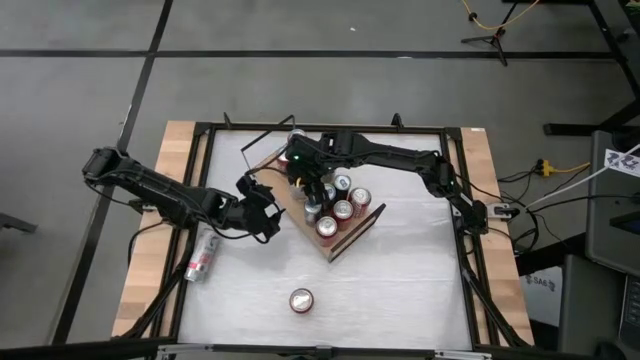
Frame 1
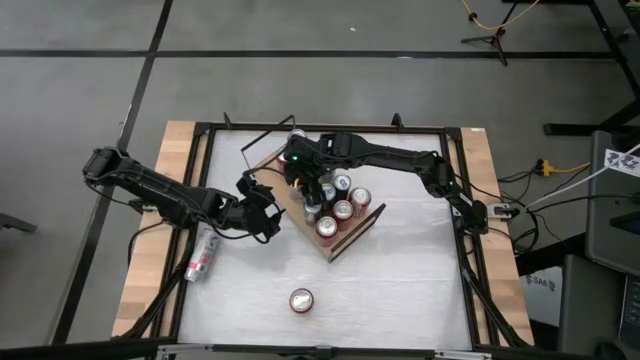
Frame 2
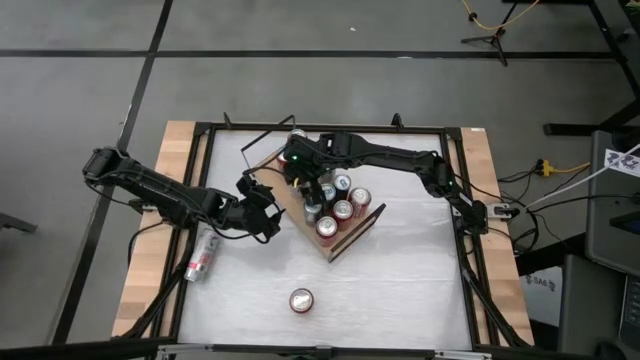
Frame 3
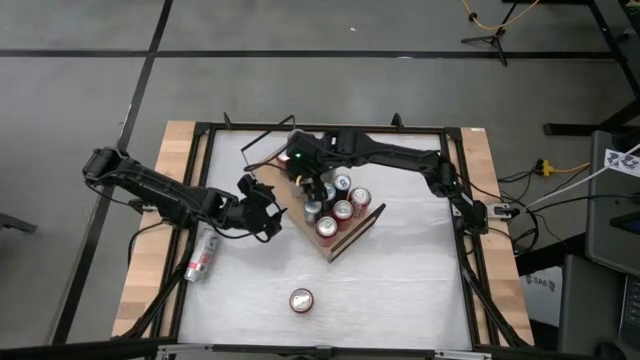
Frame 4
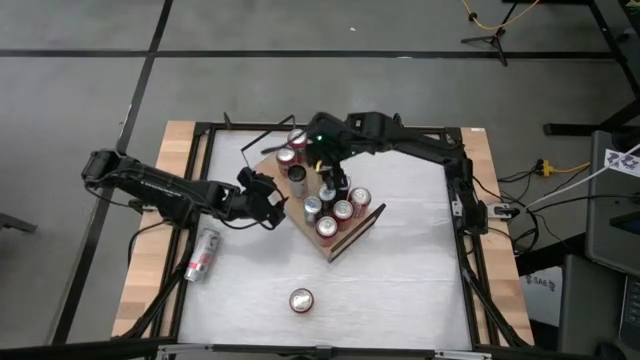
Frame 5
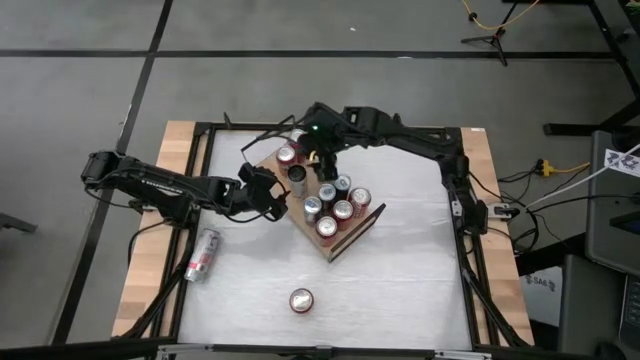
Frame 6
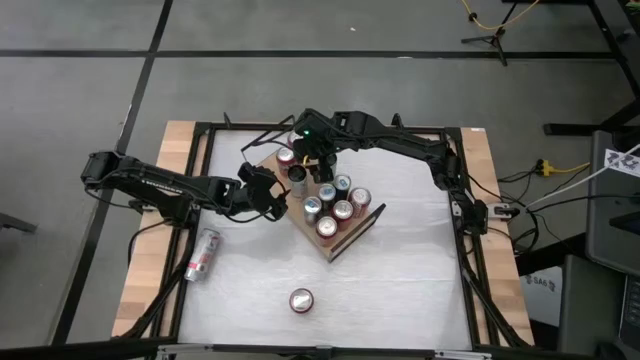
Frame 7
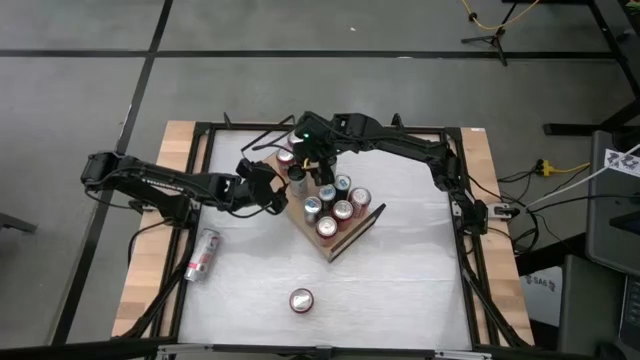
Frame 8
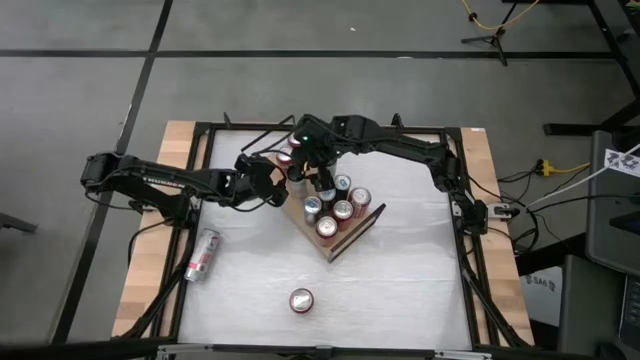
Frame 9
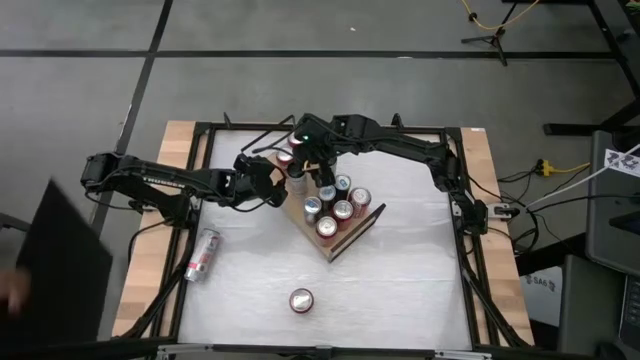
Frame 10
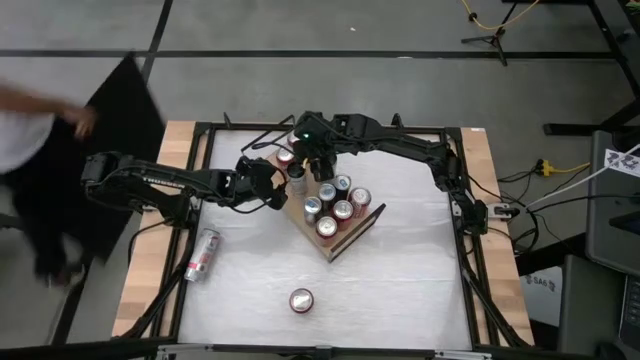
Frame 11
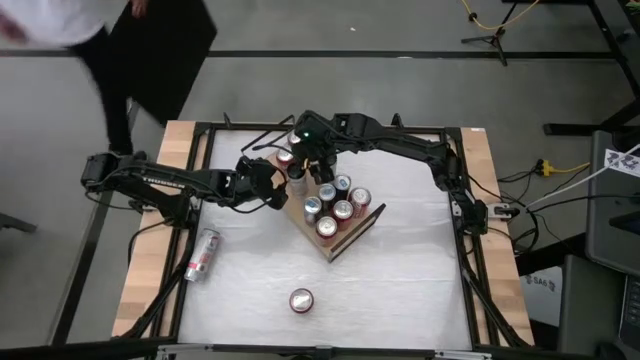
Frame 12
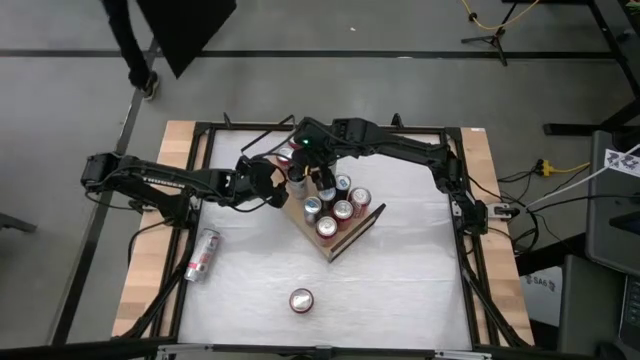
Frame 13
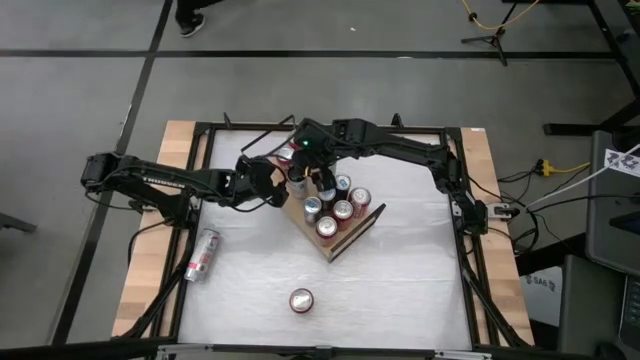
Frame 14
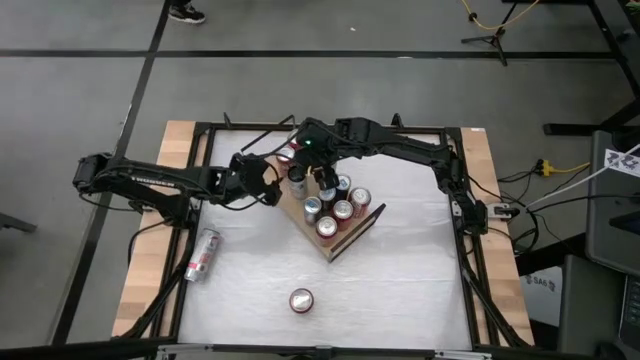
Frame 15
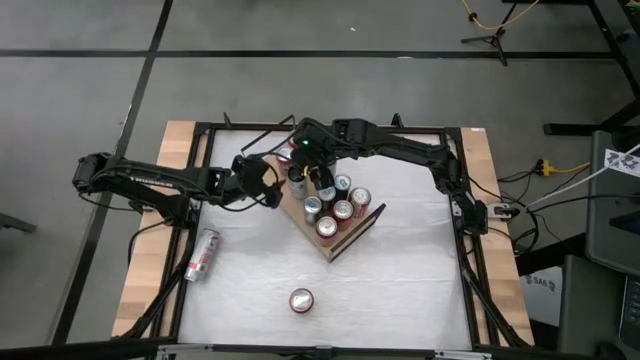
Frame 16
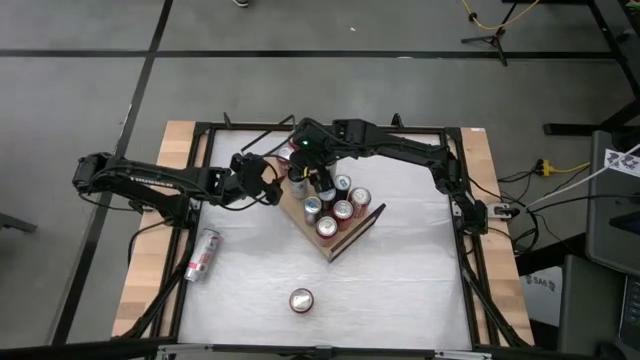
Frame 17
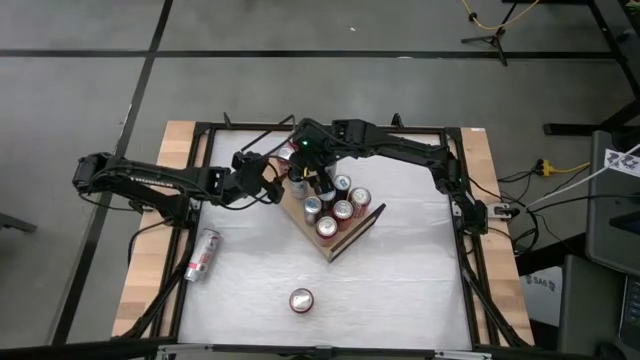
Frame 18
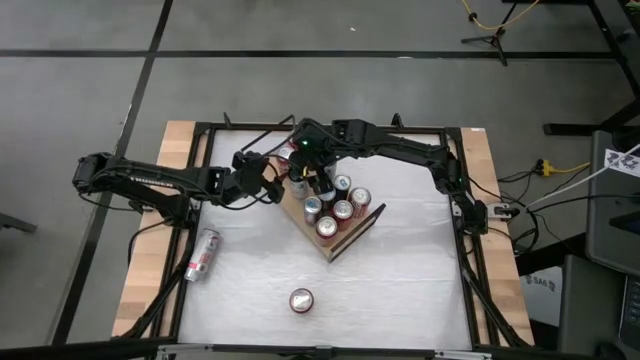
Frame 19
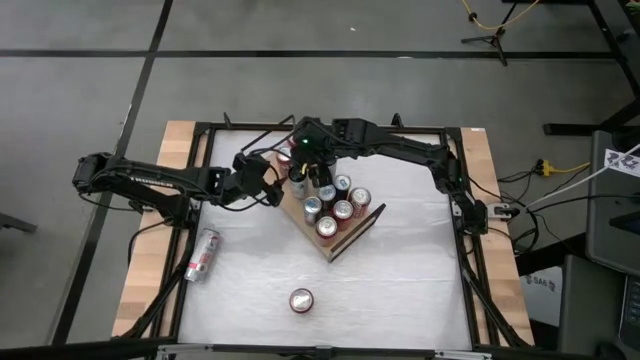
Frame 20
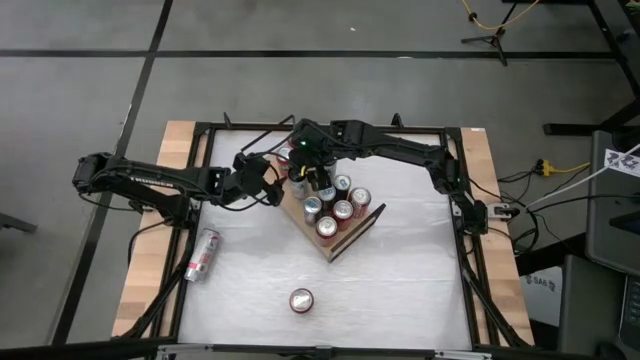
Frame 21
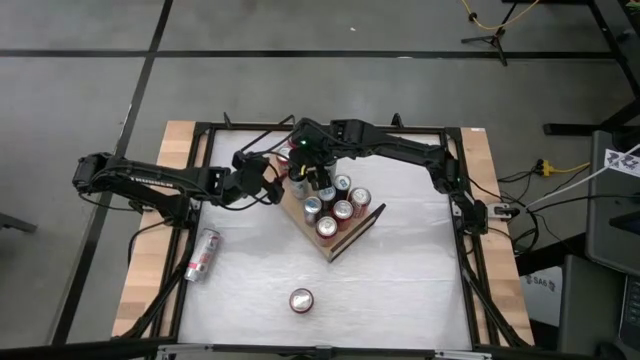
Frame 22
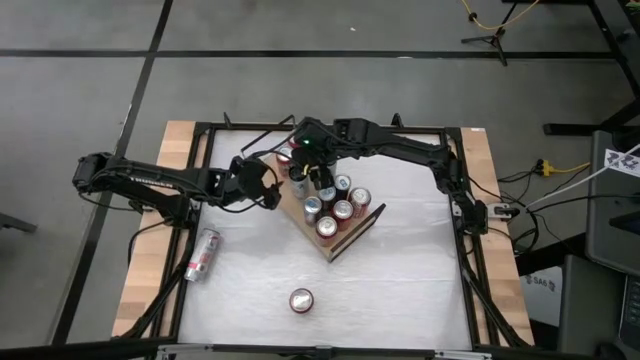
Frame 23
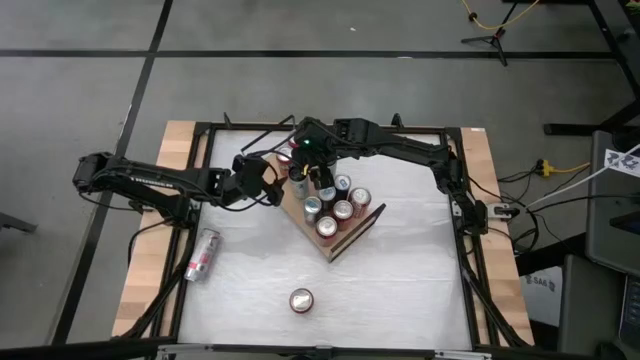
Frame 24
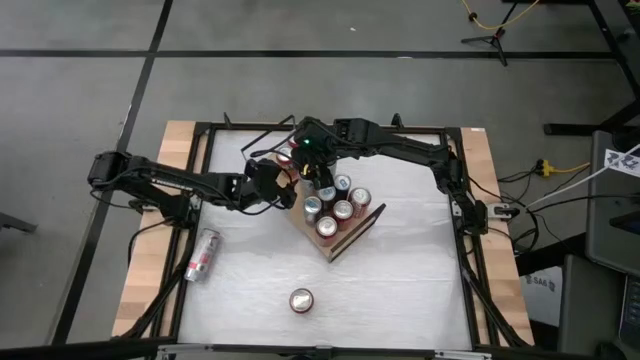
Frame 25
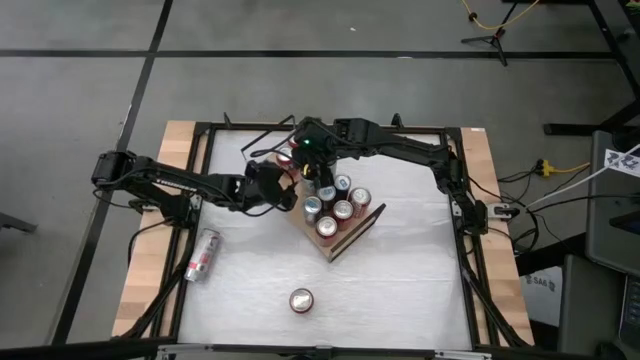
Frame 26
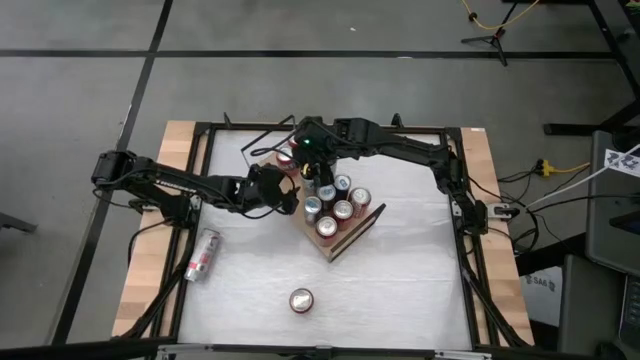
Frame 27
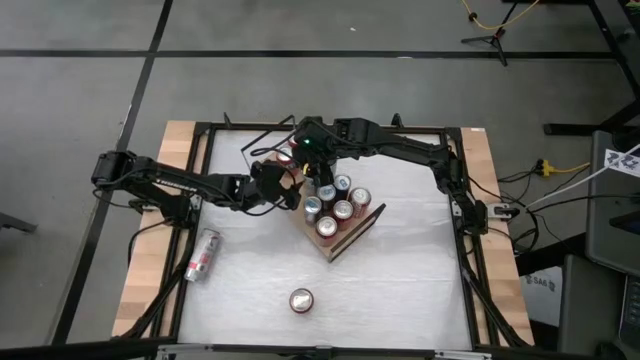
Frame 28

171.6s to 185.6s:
Task: Place canned beverage on shelf
Put the left white pink soda can on the shelf aligned with the other white pink soda can

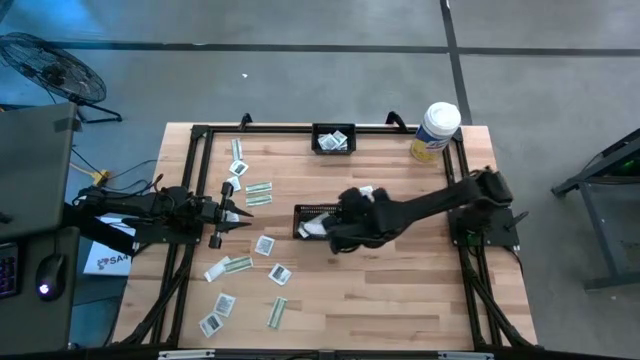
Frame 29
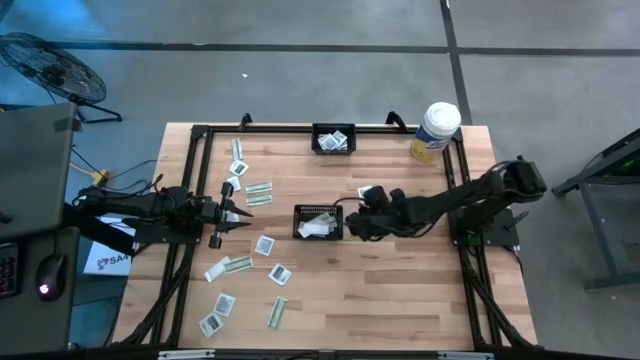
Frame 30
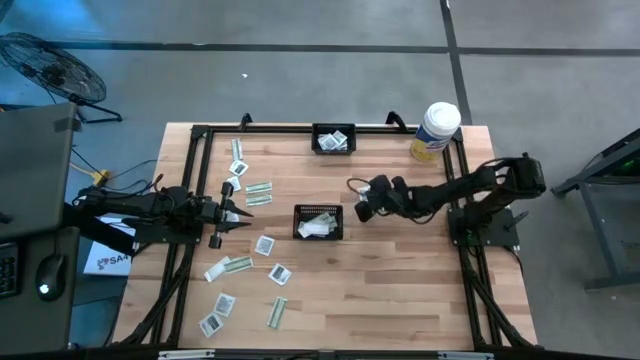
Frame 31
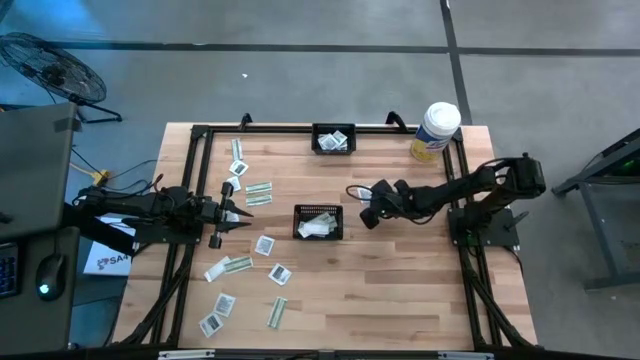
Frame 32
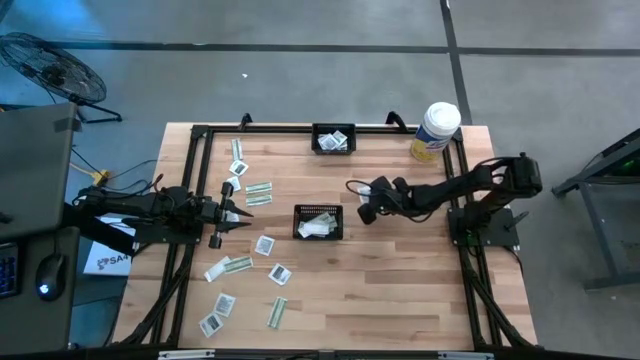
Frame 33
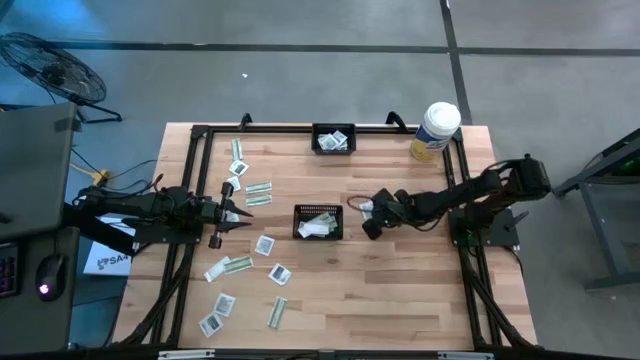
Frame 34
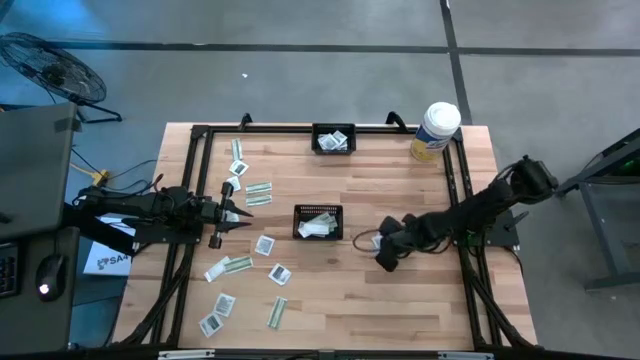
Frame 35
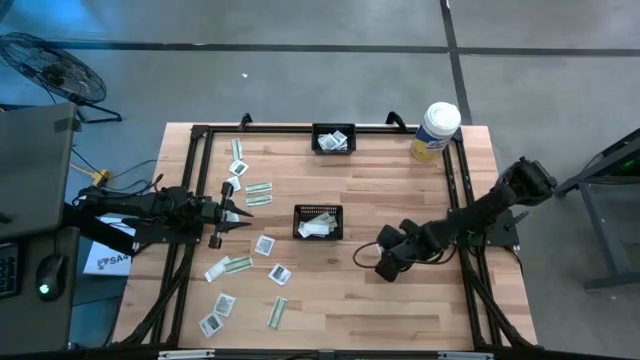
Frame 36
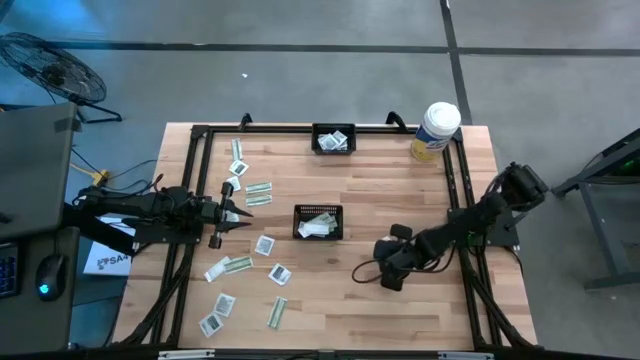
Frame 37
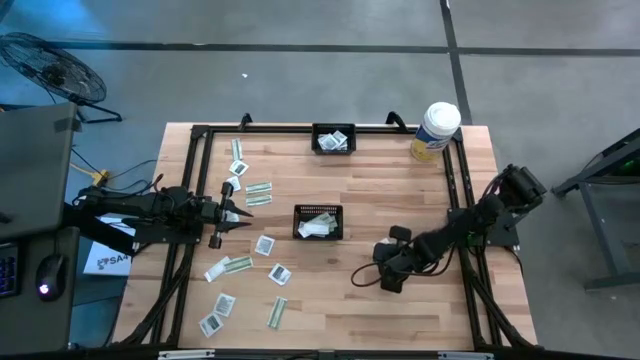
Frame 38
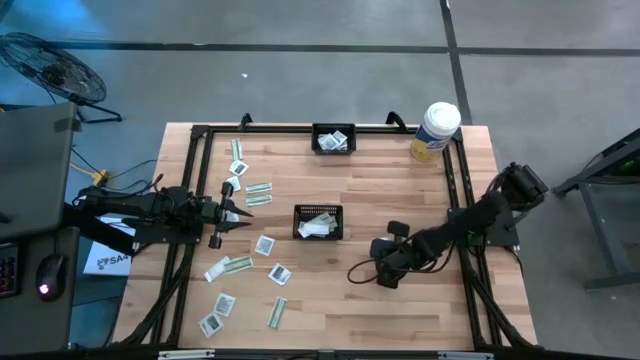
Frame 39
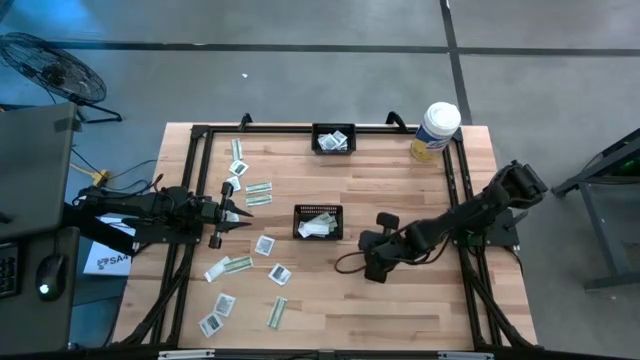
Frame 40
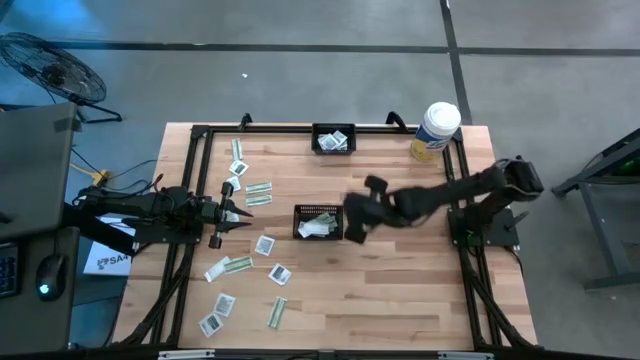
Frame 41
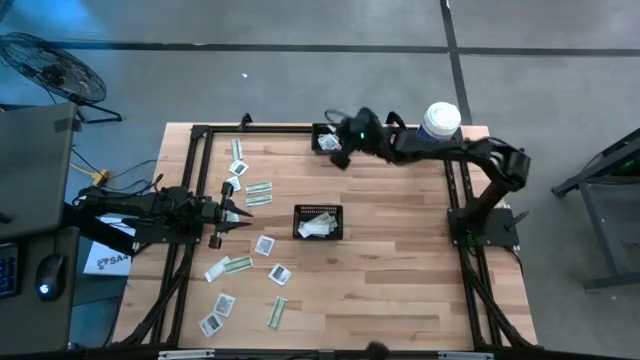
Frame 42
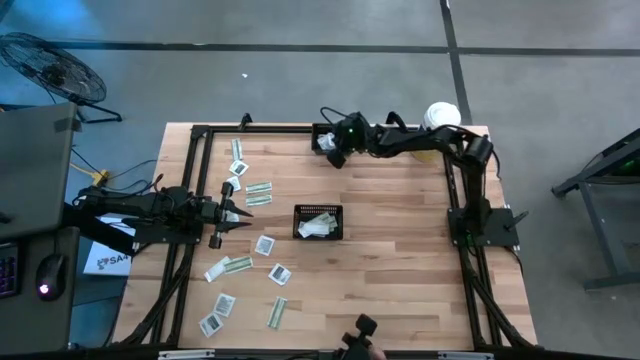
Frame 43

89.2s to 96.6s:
Task: Pick & Place First Aid Supplies
Put the towelette pack into the top black basket
